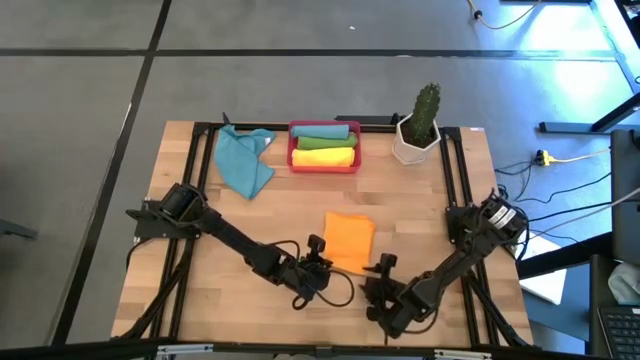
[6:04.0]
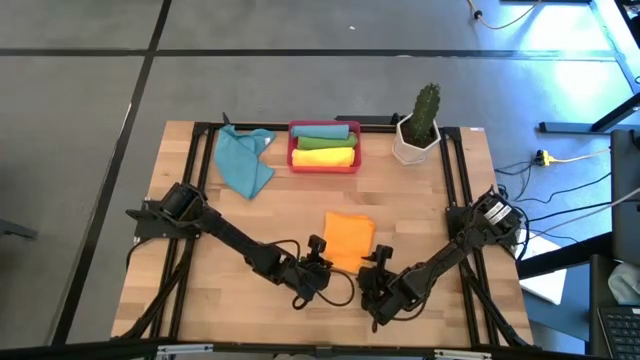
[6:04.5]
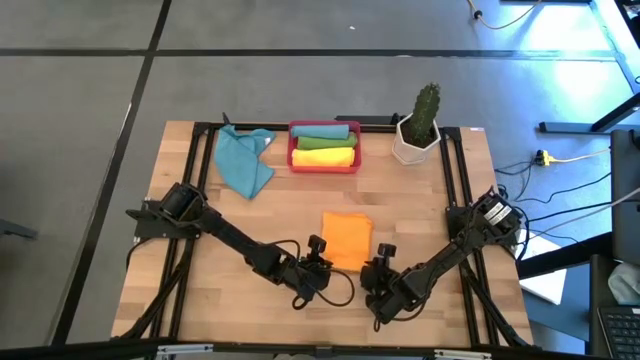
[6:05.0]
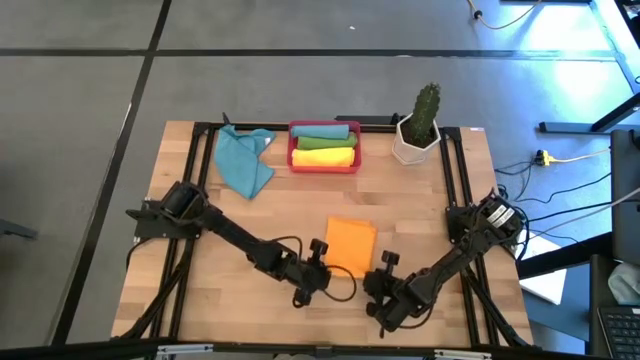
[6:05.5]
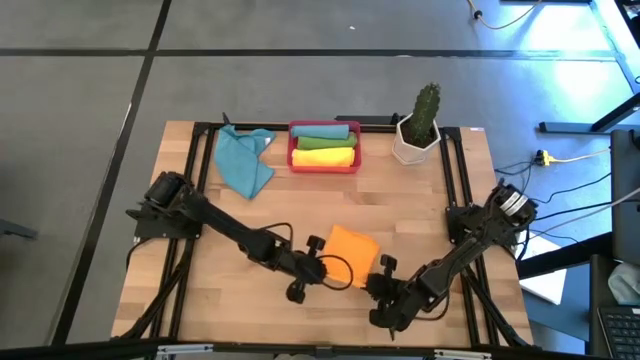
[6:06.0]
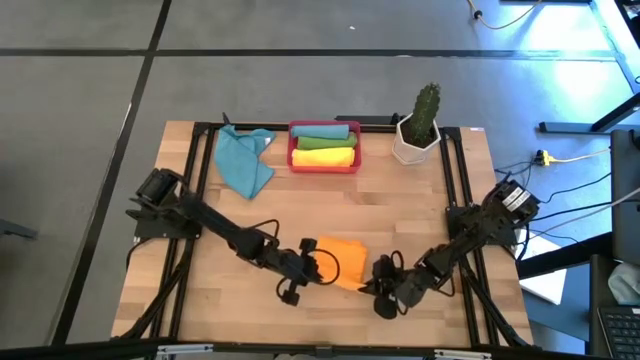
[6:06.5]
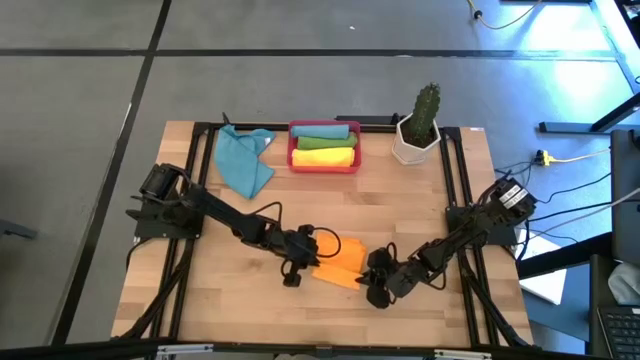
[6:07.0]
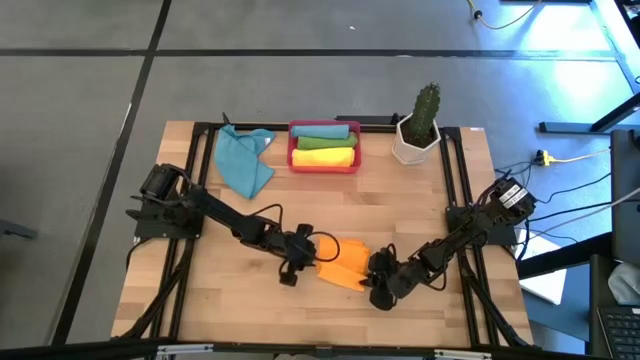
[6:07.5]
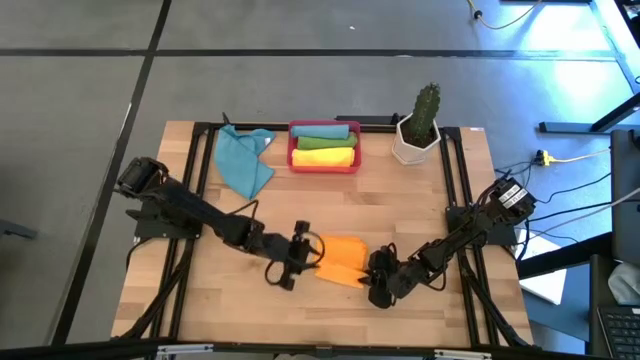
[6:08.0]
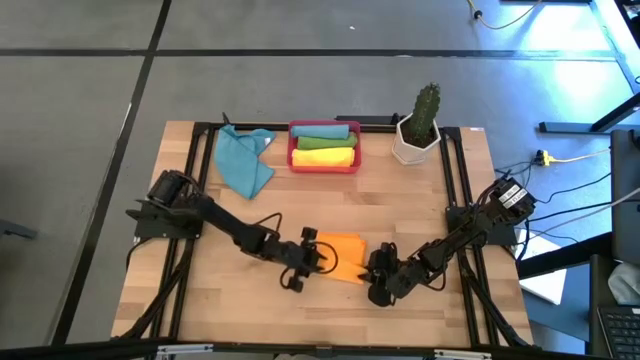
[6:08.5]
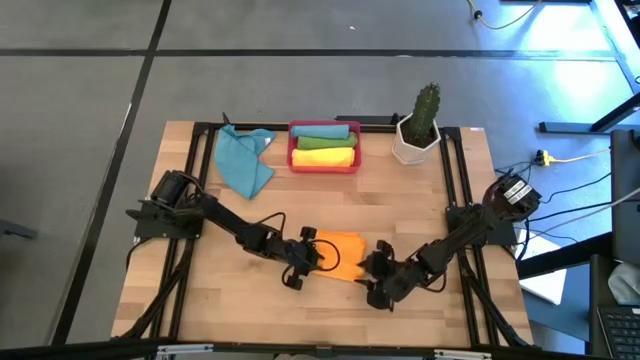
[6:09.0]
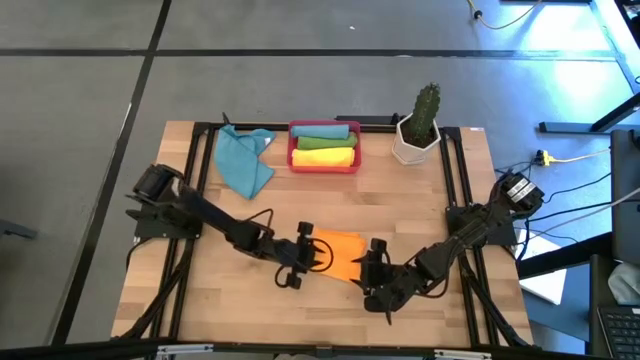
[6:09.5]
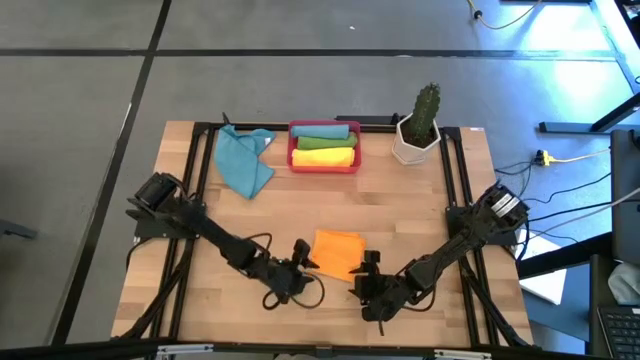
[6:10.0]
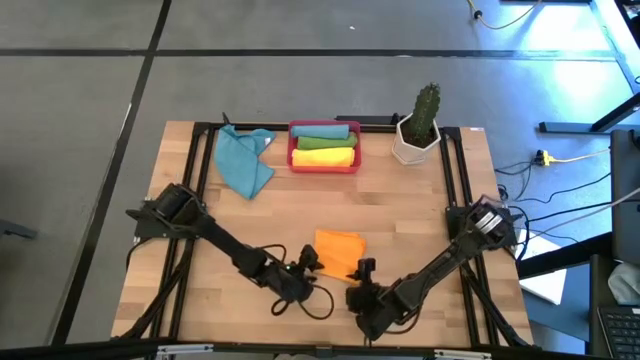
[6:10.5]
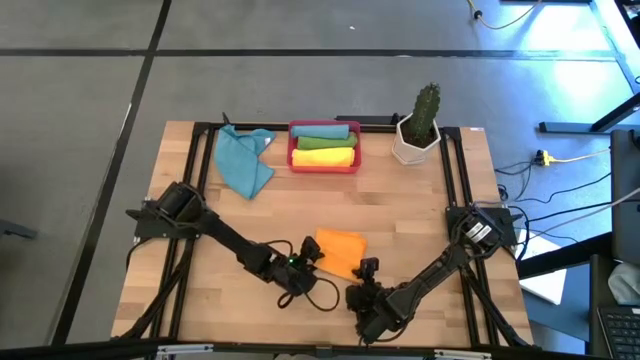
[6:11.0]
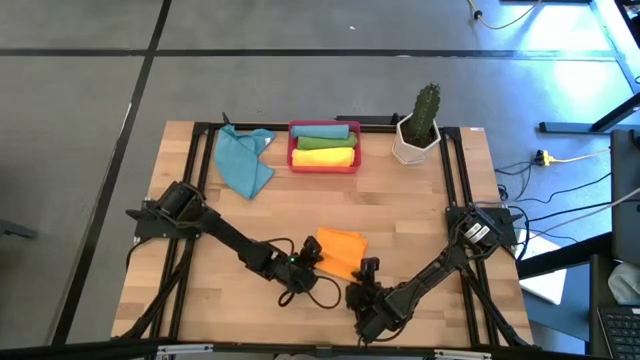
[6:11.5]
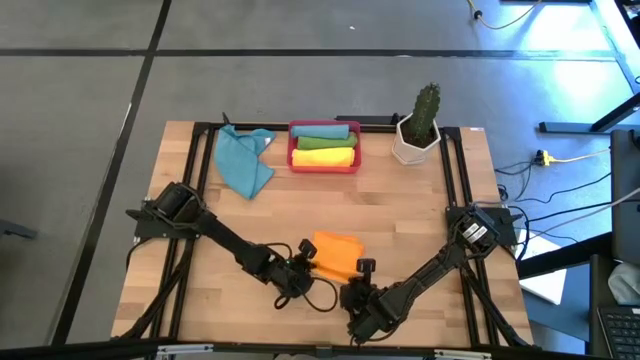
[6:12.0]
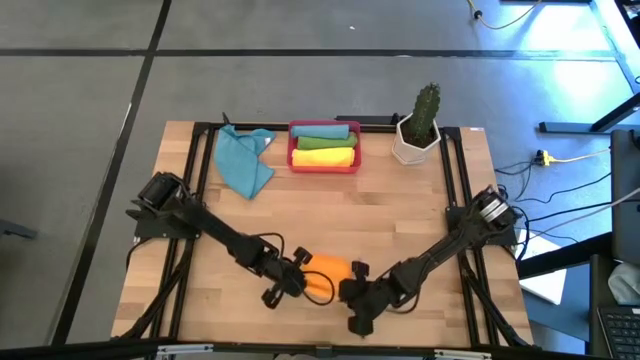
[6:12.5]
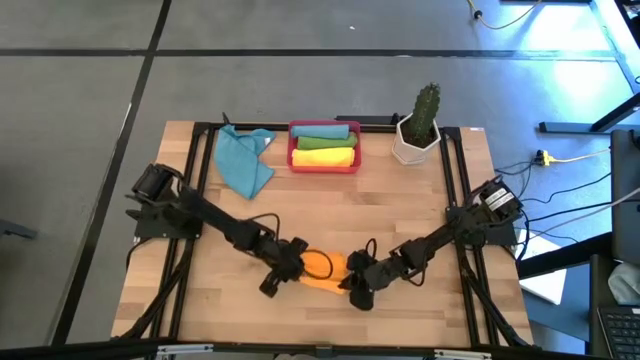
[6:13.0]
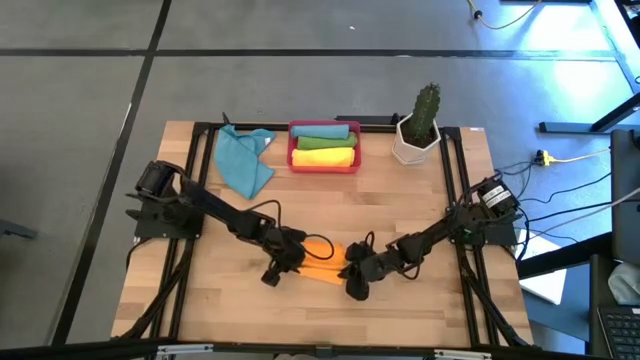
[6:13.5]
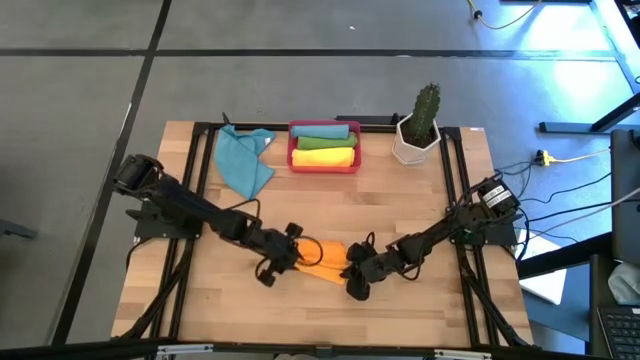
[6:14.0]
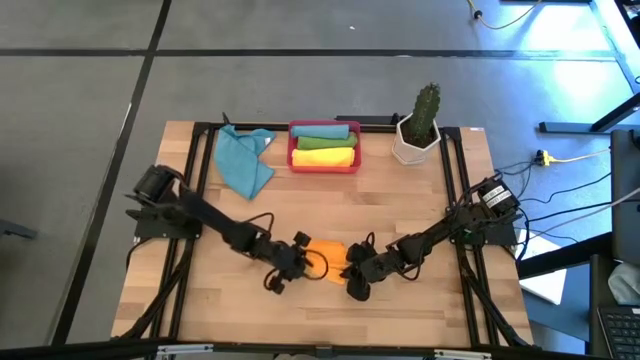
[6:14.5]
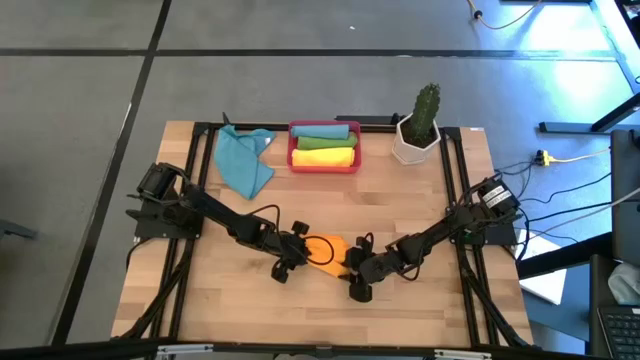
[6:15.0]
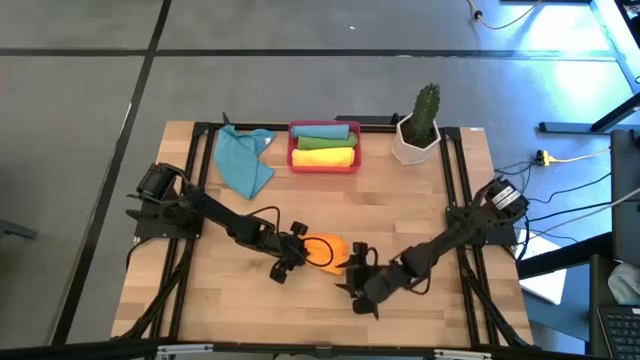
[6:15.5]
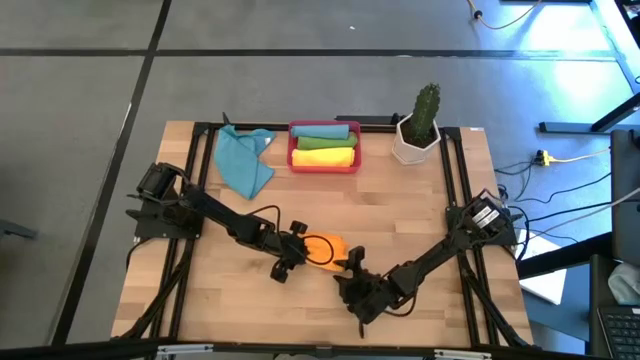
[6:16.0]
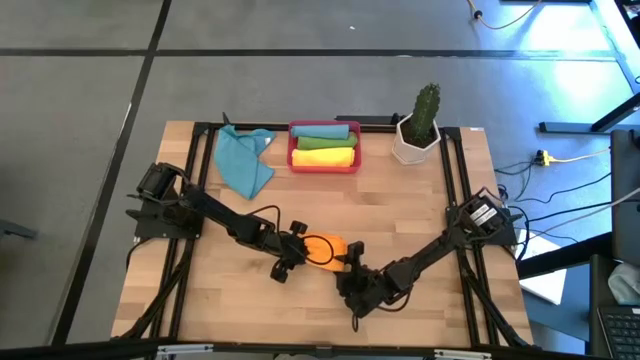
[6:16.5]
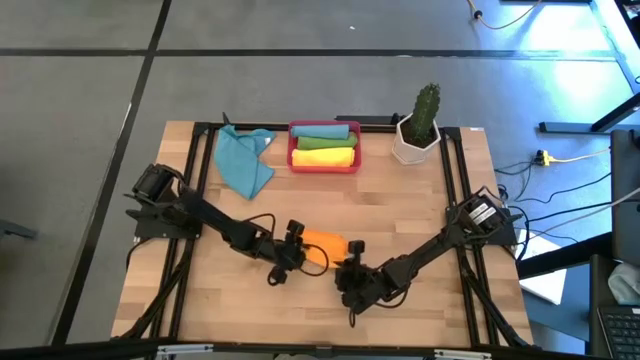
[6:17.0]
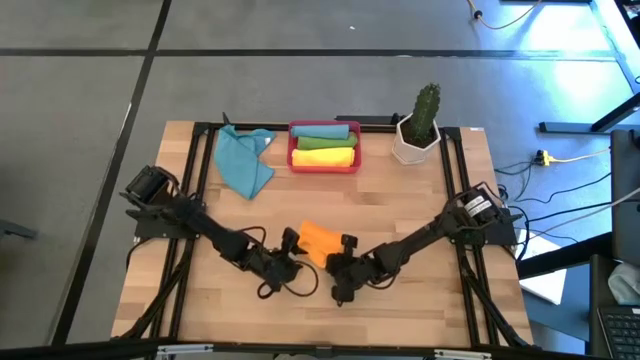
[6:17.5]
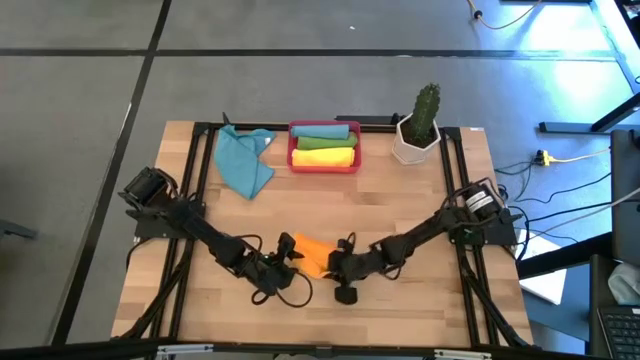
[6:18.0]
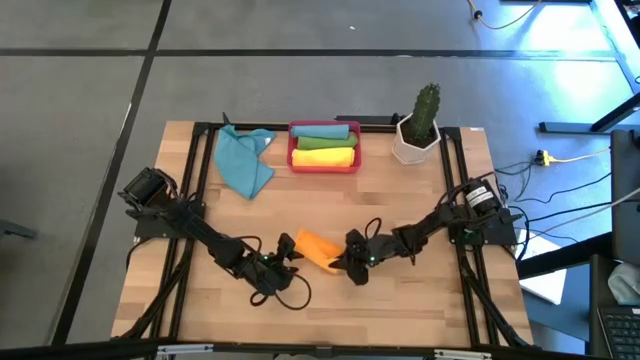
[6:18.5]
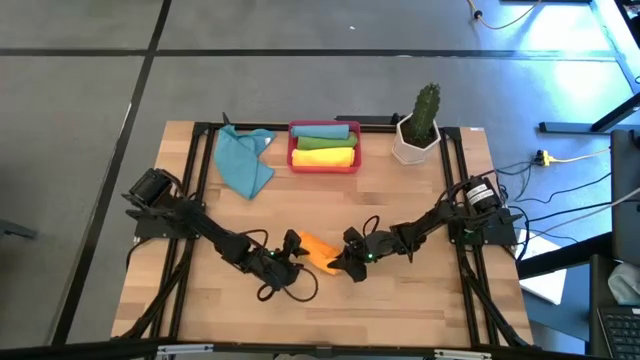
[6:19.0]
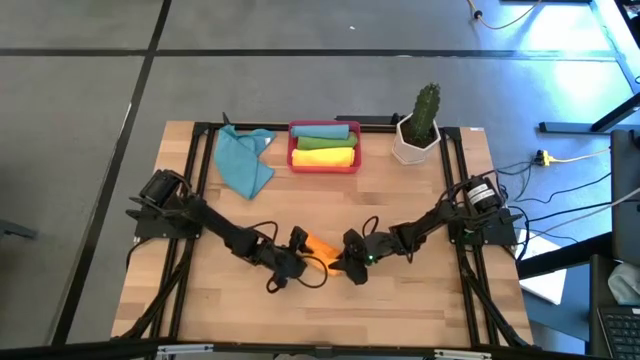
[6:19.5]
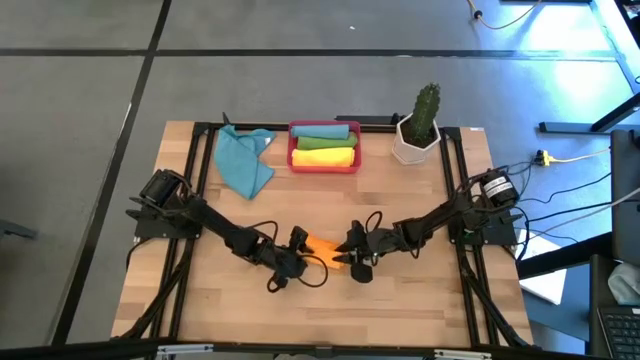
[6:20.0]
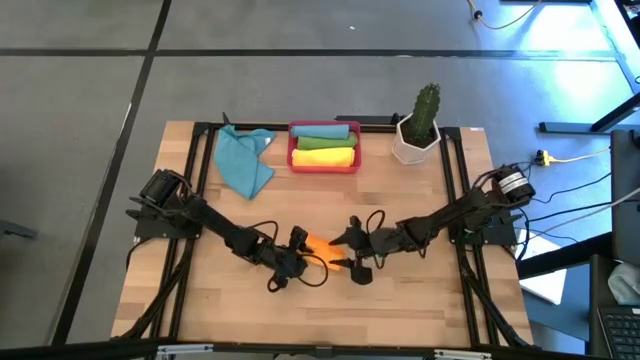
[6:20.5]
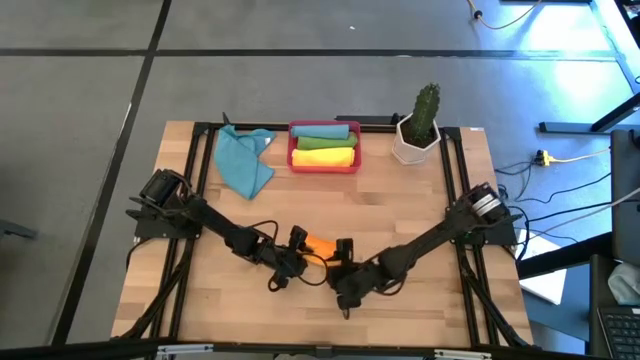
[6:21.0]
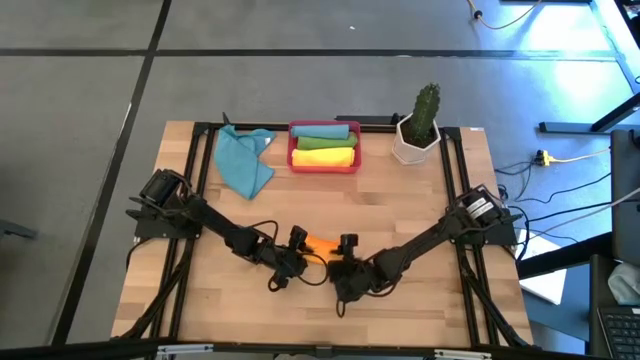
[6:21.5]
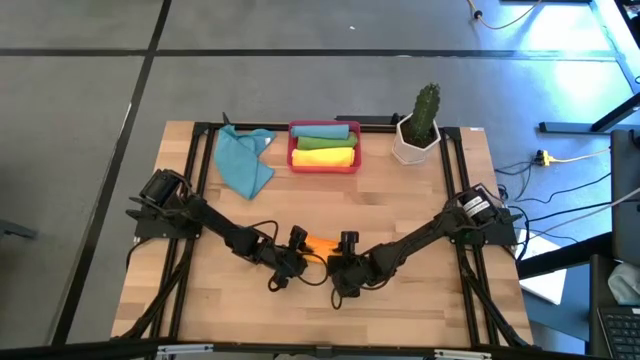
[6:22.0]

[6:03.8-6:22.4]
Task: Roll microfiber towels into tight, uniform cylinder then place into a basket
Roll the orange towel

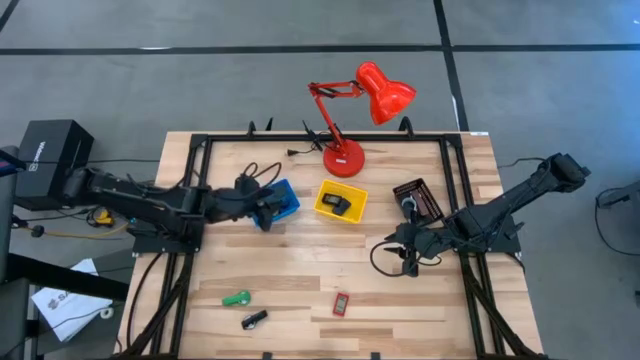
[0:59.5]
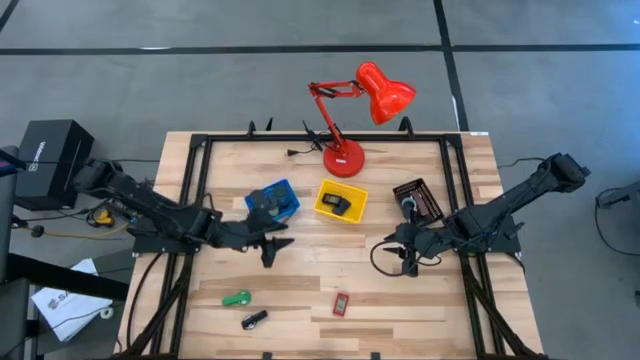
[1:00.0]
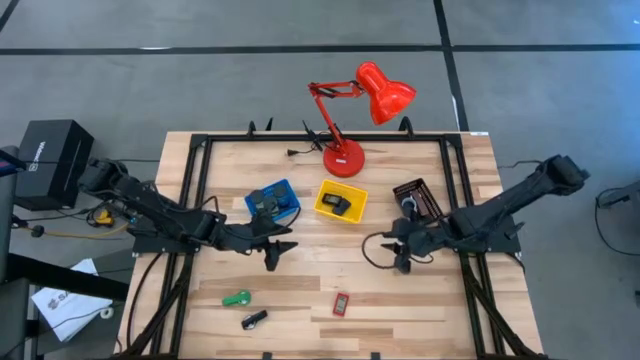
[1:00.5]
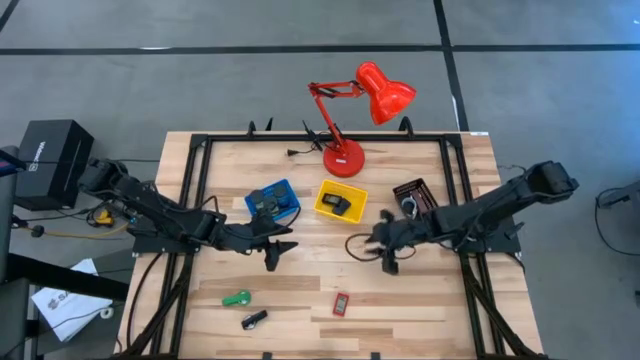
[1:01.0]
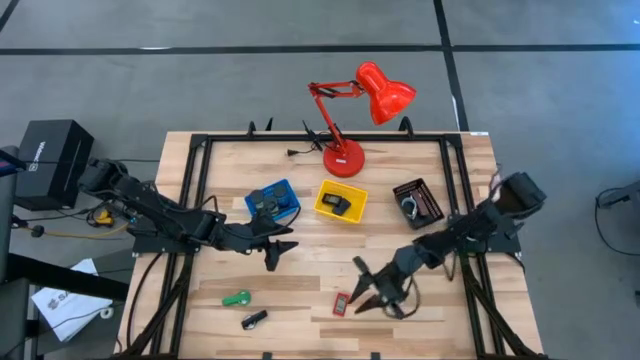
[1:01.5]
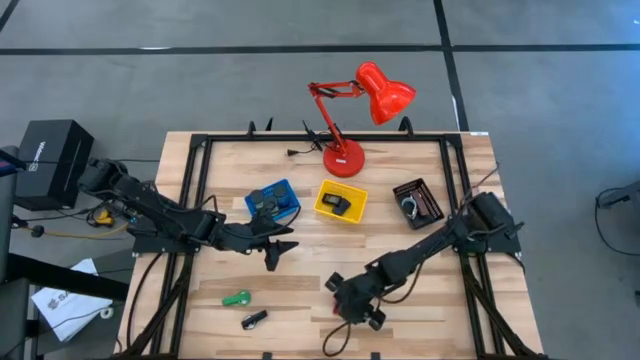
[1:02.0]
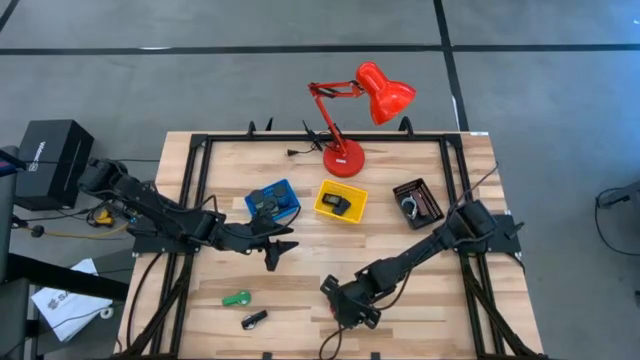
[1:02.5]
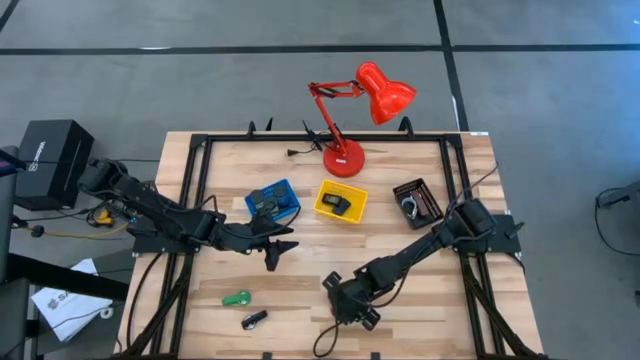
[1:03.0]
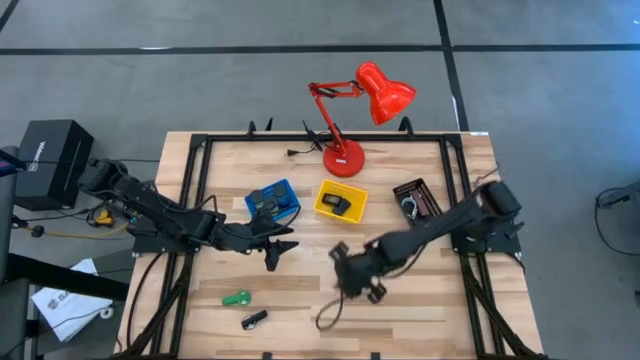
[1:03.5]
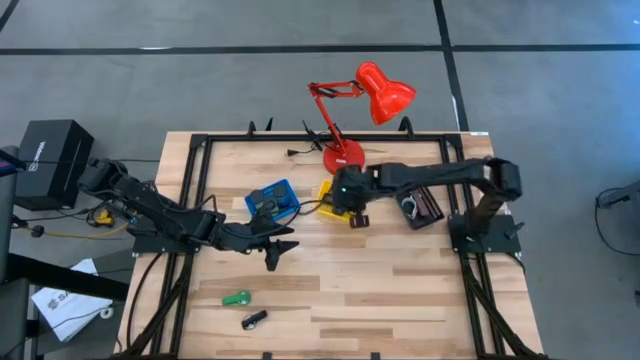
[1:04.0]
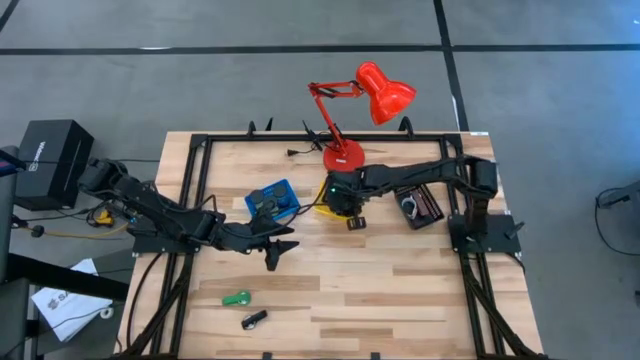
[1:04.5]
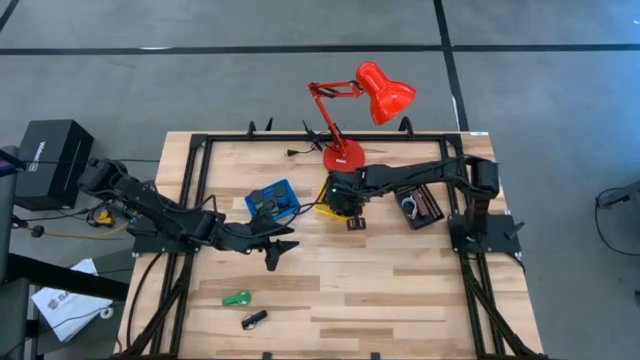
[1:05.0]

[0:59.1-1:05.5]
Task: Pick & Place Office items
Put the red digital clock into the yellow bin
